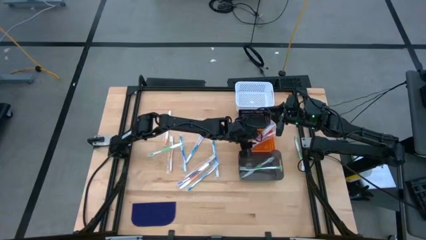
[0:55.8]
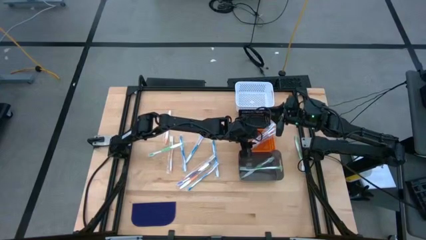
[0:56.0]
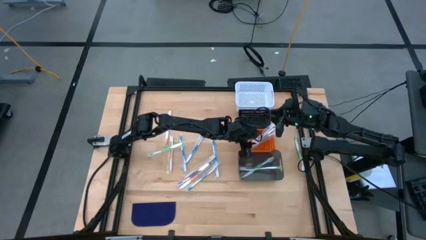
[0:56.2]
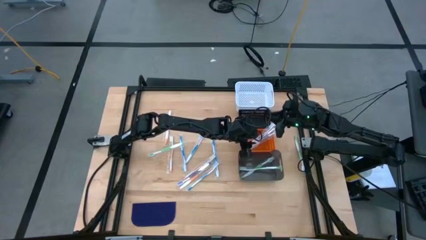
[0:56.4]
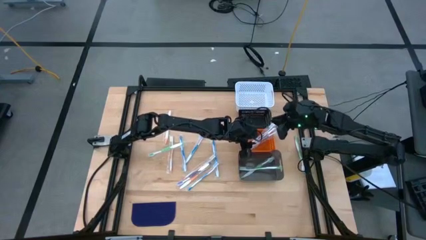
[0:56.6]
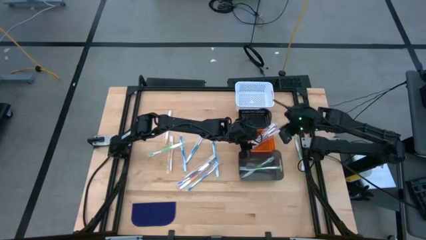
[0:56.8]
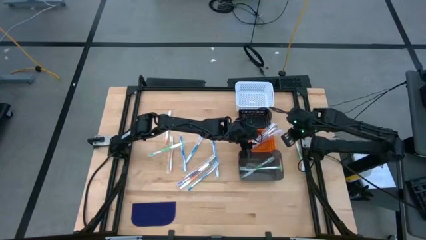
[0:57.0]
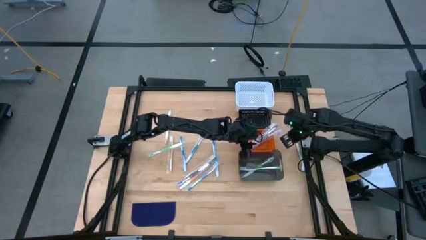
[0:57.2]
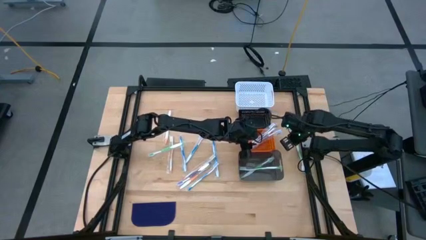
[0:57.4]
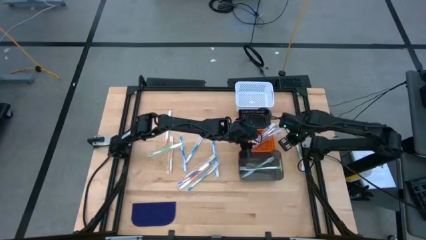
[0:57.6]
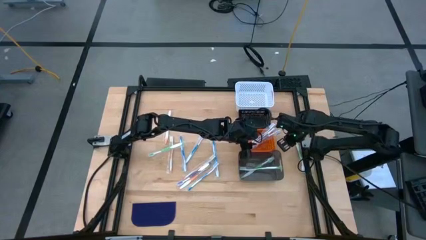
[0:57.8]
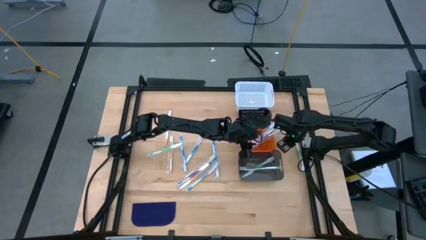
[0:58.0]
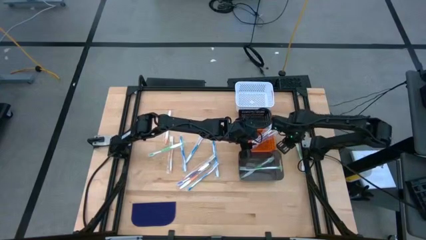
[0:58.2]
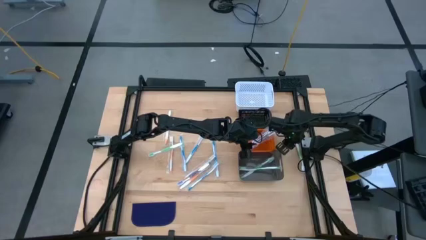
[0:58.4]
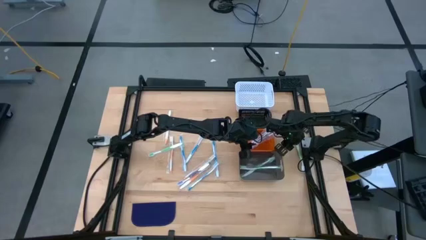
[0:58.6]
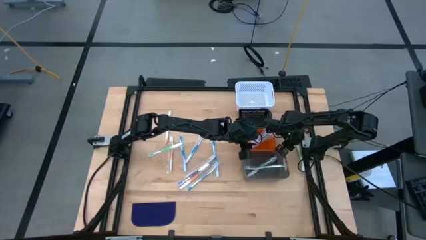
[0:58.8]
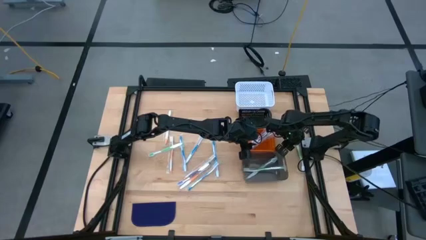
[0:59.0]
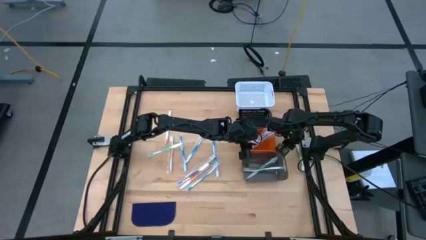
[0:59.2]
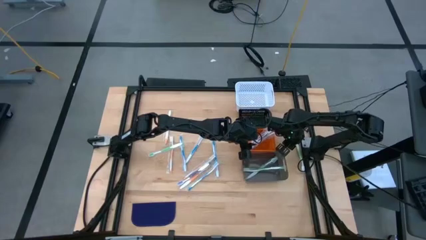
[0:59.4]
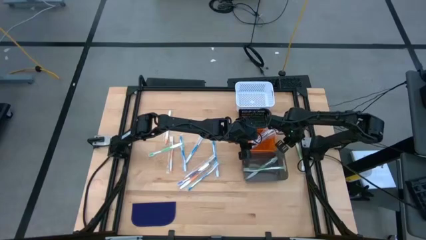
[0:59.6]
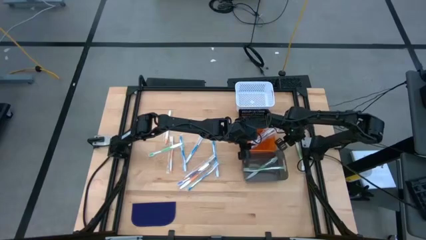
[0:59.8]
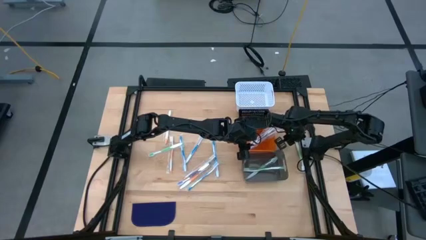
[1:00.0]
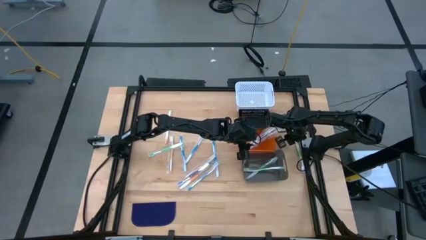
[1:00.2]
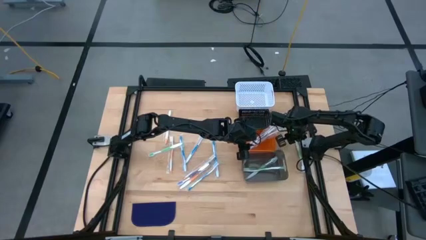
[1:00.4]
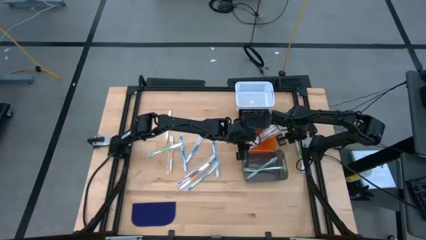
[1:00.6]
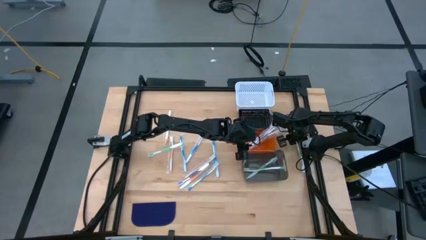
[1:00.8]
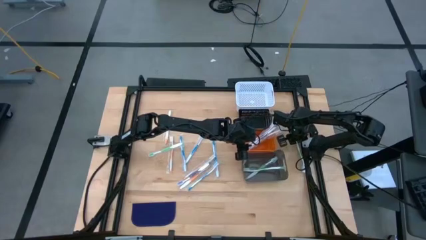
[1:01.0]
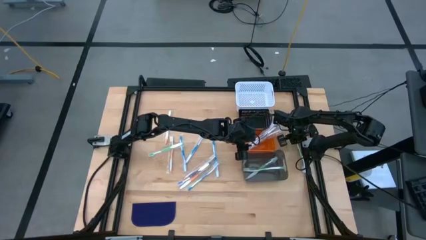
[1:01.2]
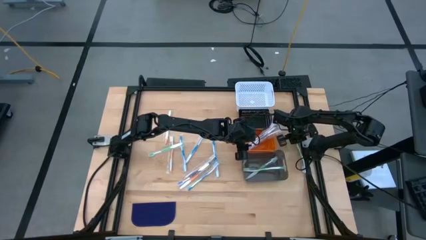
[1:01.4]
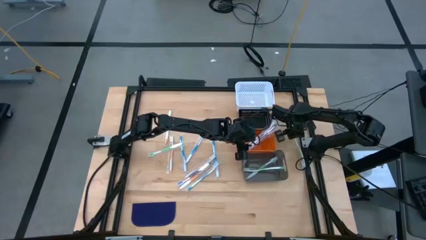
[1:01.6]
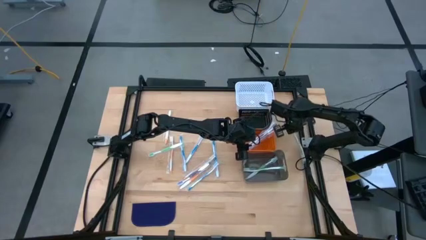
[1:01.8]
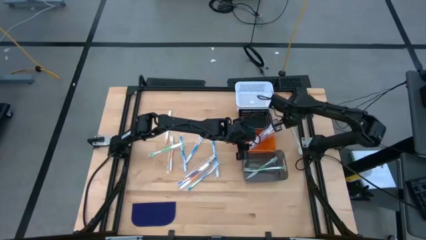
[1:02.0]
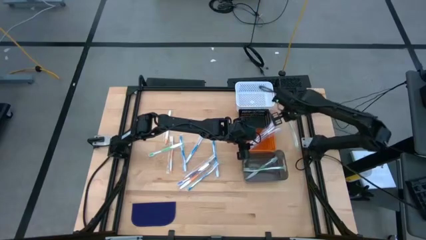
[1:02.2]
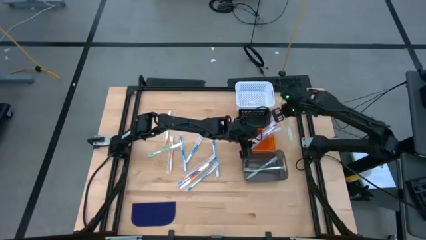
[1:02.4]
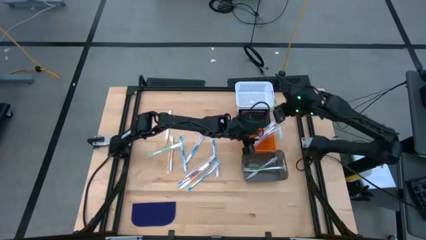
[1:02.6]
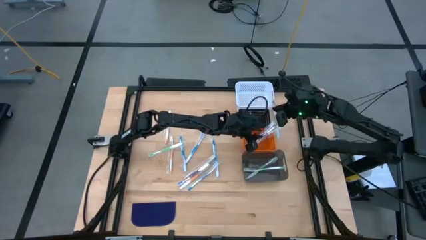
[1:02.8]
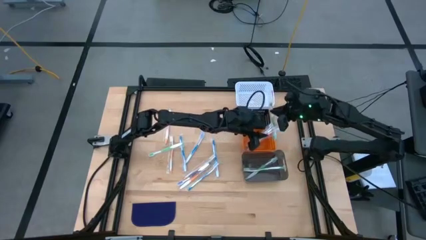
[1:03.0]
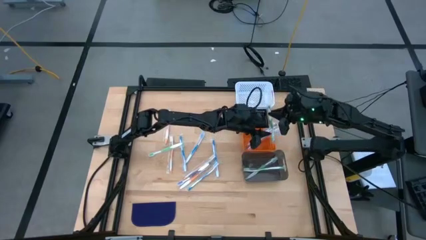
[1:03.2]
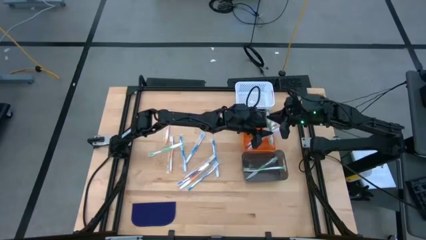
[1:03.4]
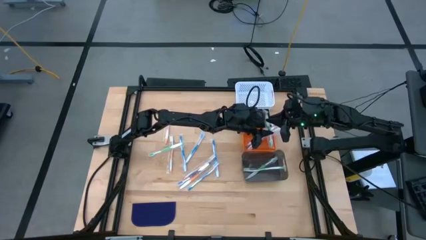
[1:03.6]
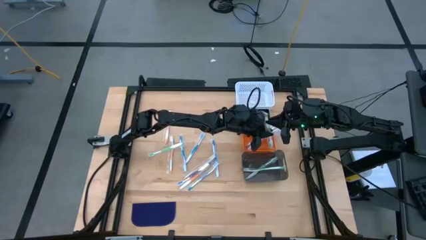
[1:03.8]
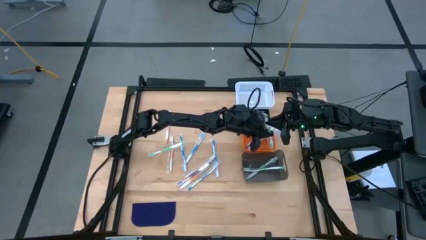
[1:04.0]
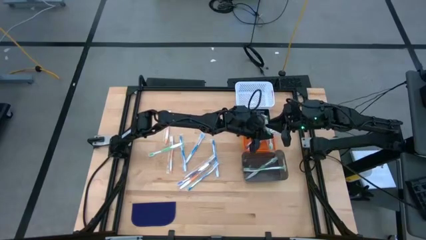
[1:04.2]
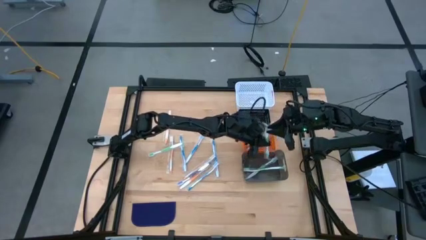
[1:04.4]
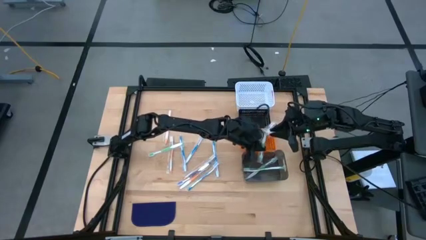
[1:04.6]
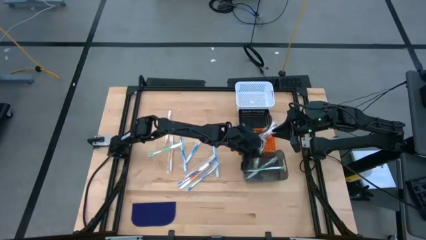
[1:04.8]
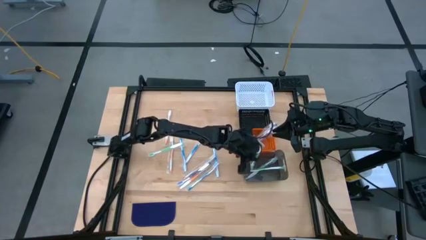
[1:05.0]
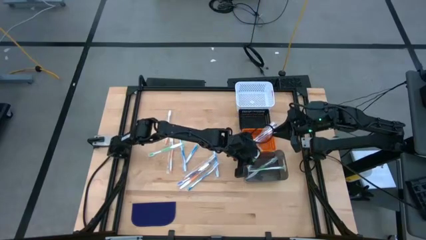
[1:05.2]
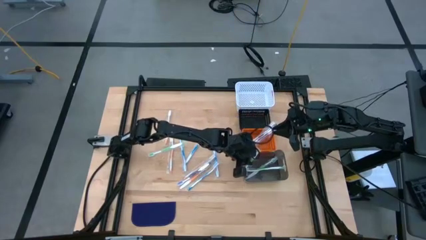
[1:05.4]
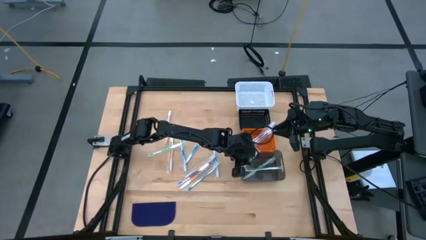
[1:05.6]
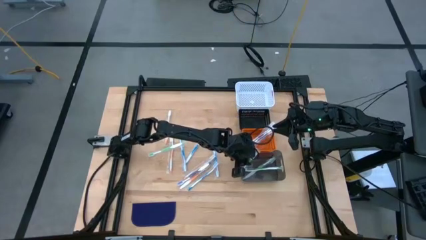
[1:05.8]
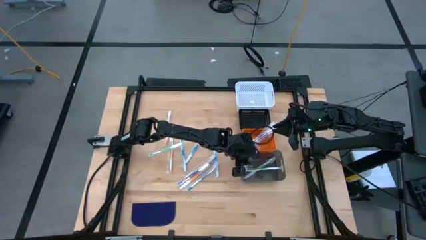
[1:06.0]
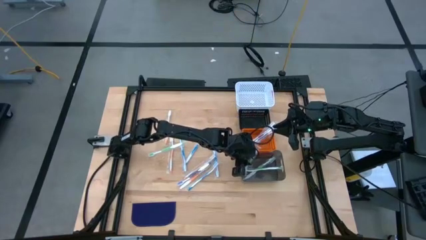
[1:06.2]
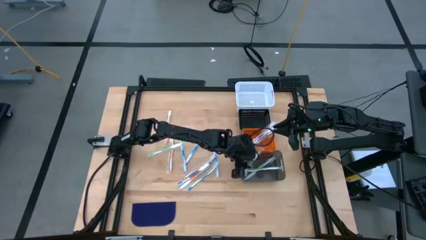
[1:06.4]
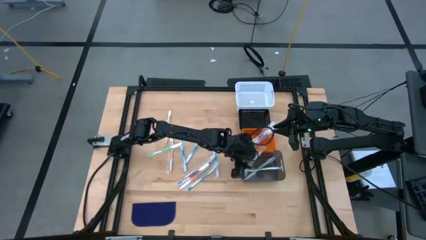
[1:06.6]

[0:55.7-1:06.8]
Task: Pick & Place Toothbrushes
Put the green toothbrush into the gray bin

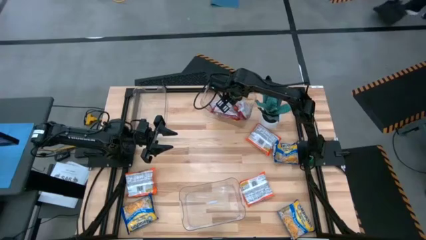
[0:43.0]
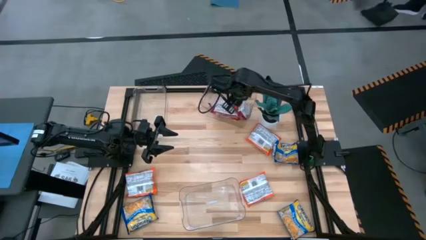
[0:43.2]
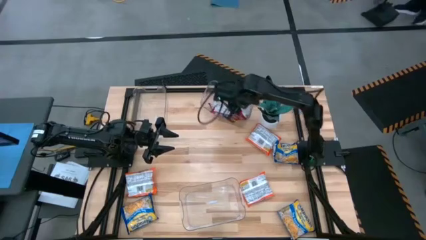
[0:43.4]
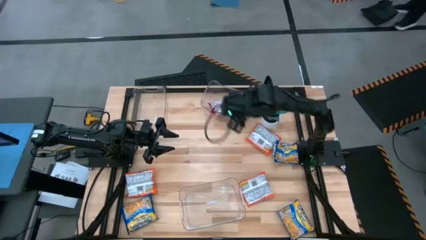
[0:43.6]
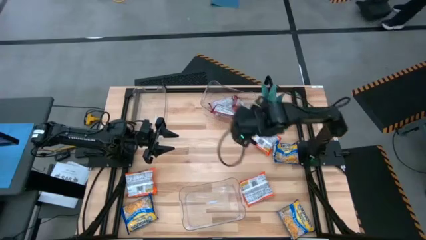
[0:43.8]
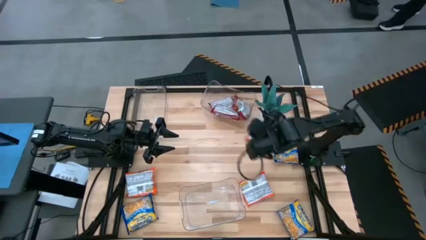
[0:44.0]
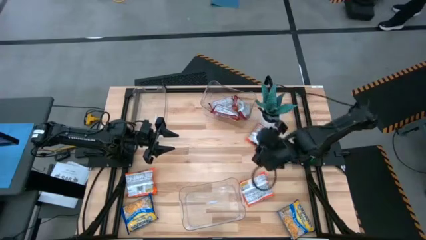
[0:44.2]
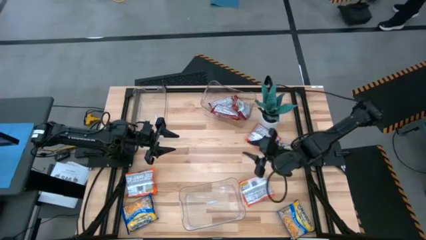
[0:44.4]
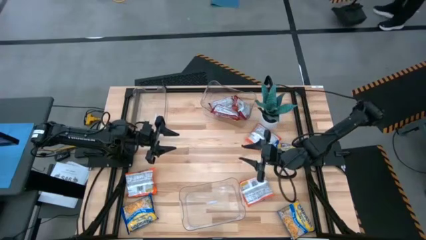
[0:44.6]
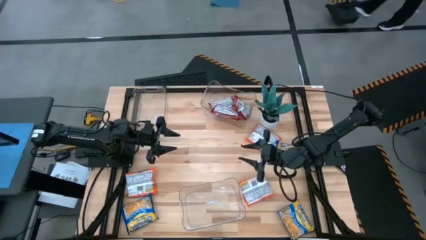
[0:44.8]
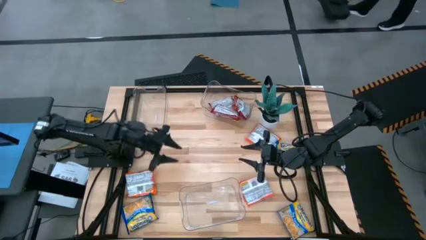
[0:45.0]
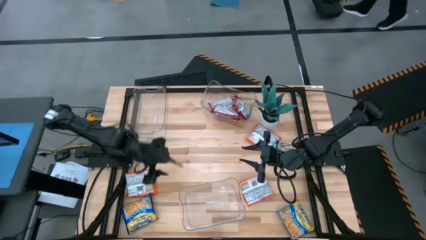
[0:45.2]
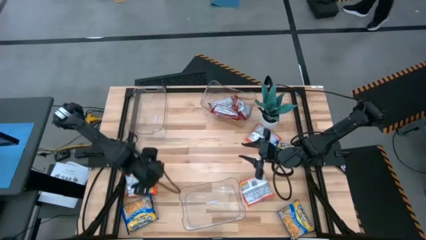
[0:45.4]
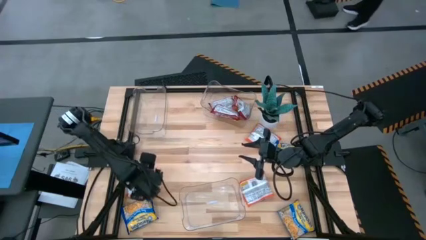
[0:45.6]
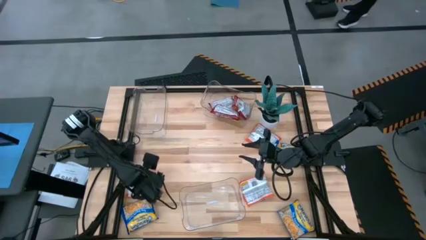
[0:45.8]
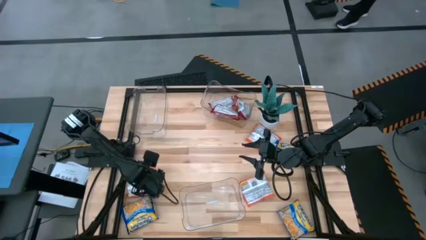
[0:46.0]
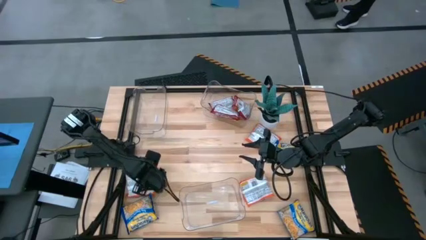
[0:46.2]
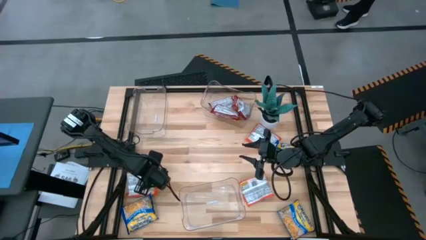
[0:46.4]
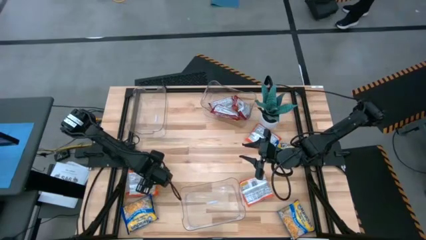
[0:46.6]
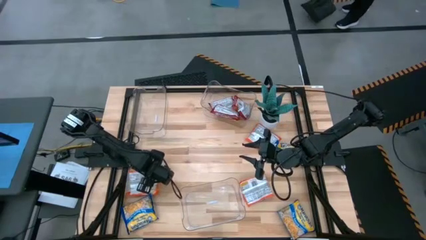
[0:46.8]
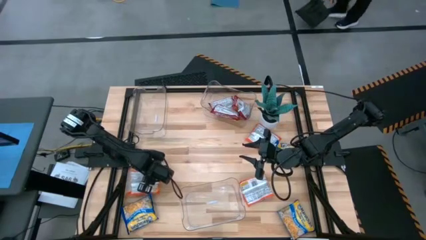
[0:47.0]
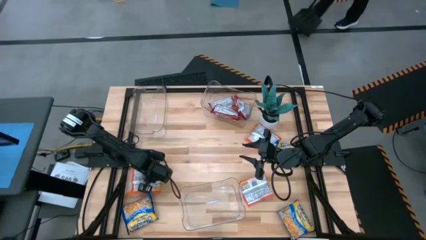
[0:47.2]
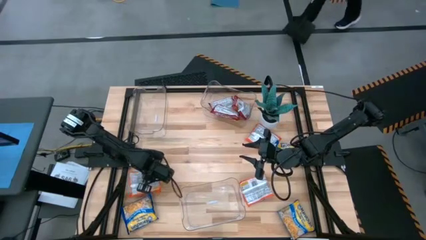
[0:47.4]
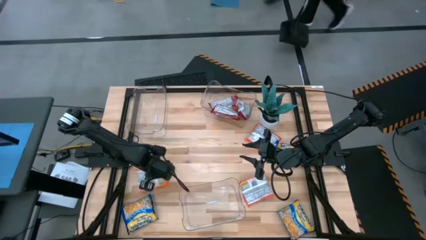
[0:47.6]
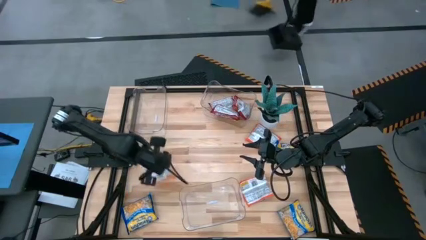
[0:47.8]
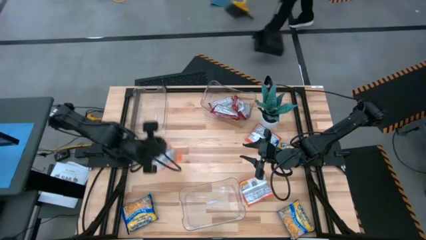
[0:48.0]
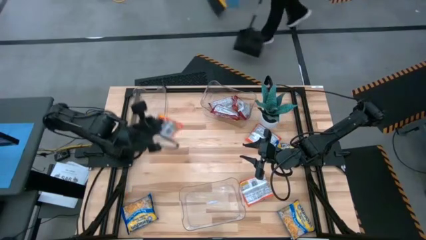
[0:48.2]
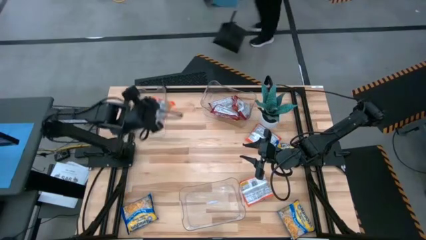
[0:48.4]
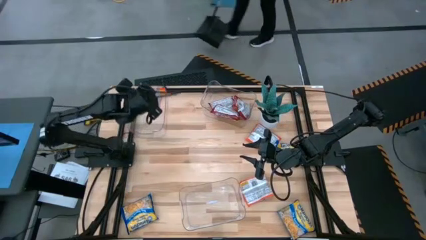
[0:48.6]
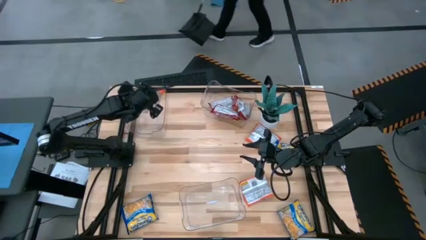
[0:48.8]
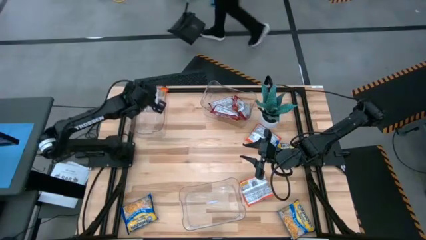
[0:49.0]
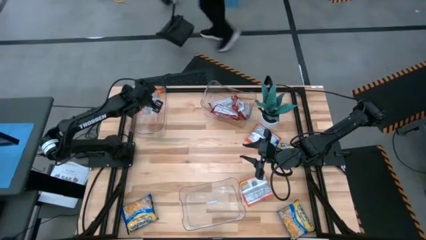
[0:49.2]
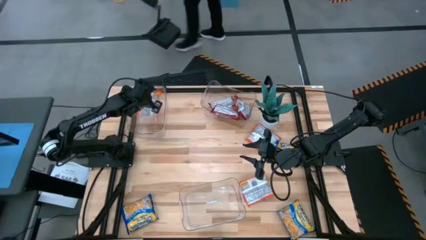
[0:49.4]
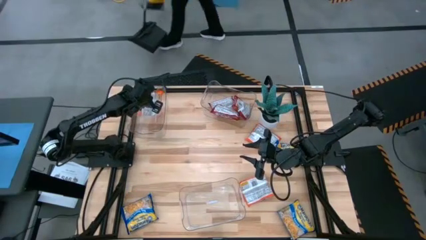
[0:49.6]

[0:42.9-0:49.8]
Task: Sort Maruchan noodles
Put the bottom left orange noodle pack into the top top left transparent bin
